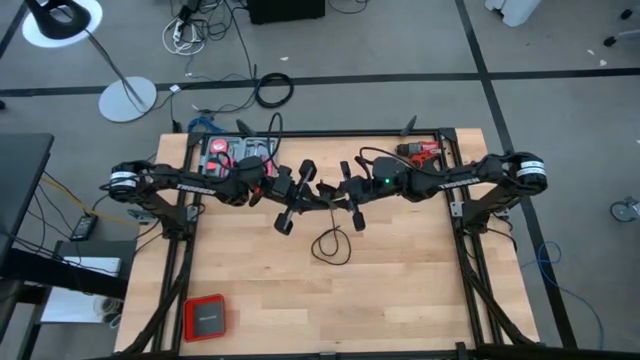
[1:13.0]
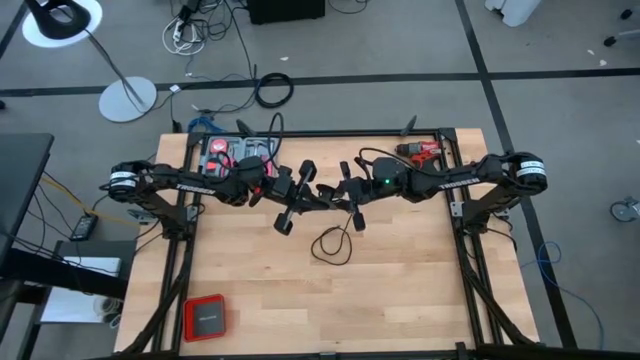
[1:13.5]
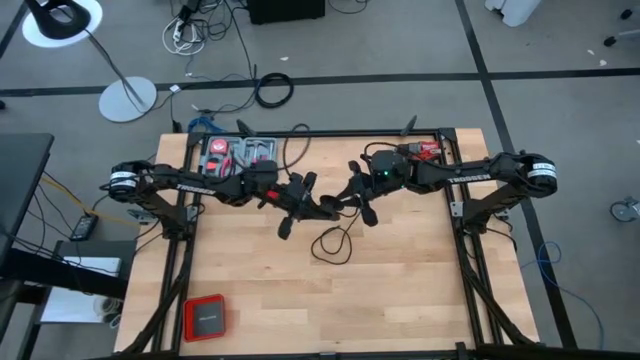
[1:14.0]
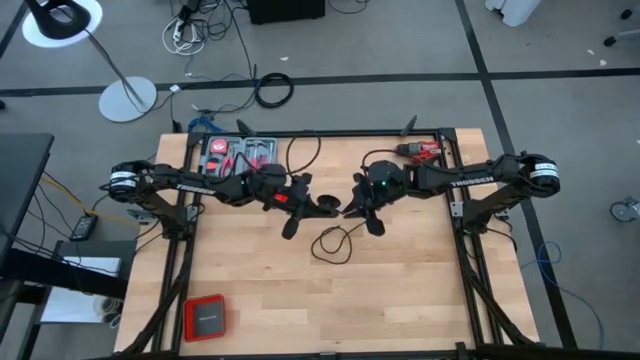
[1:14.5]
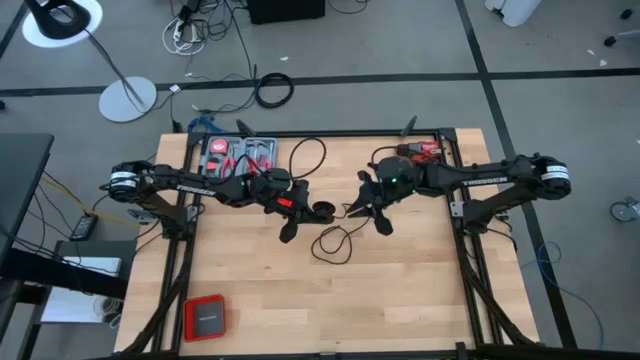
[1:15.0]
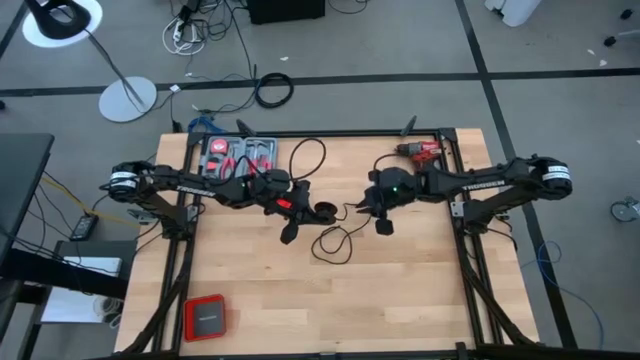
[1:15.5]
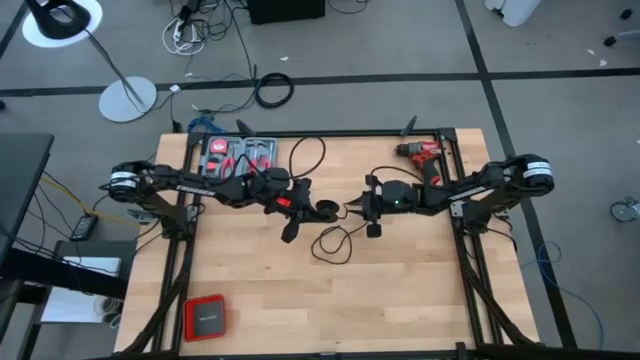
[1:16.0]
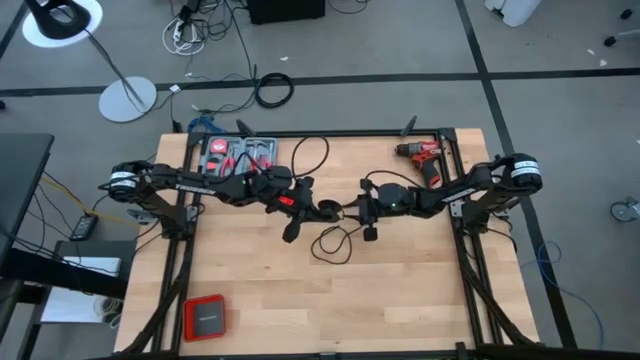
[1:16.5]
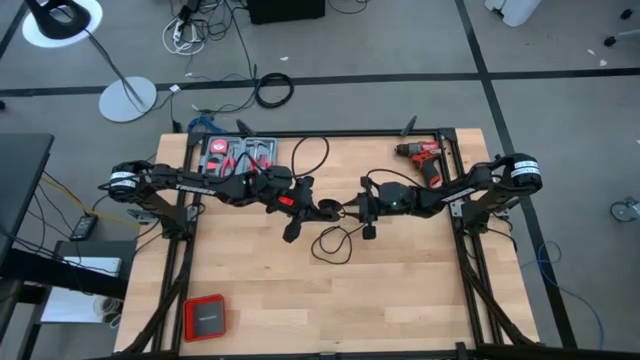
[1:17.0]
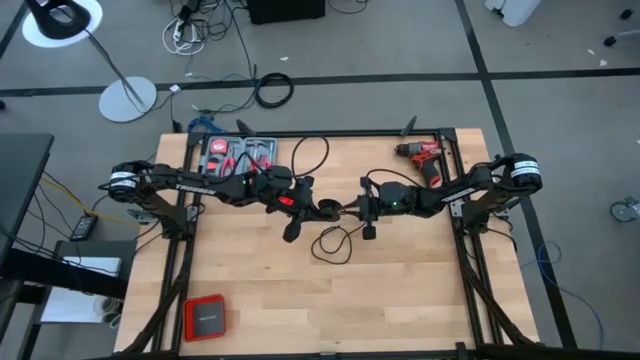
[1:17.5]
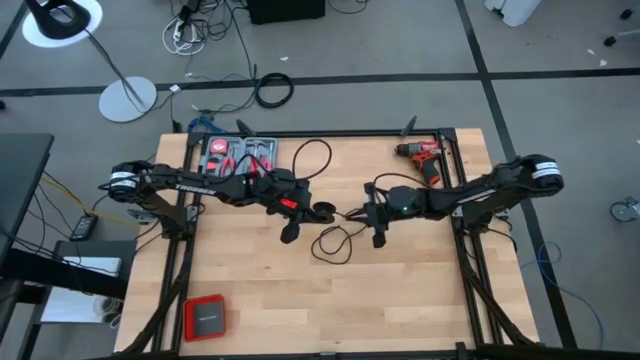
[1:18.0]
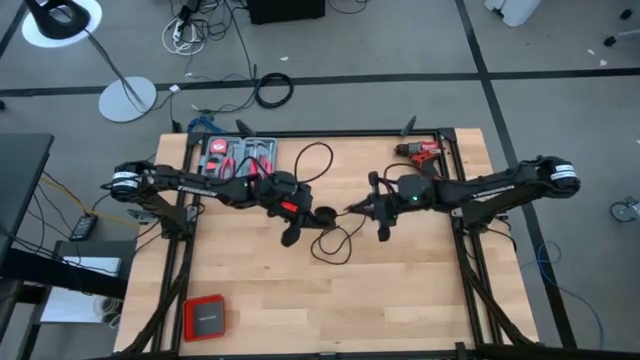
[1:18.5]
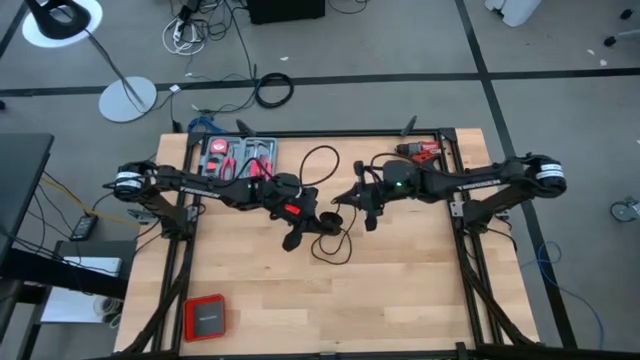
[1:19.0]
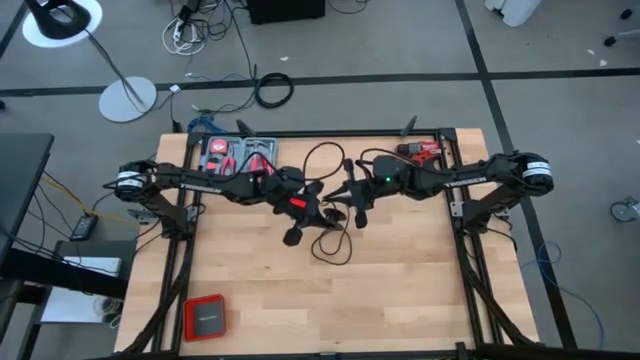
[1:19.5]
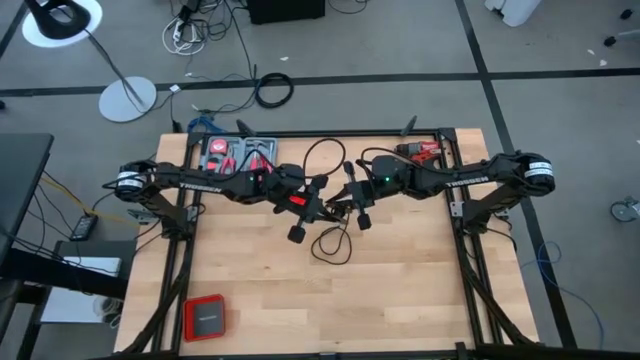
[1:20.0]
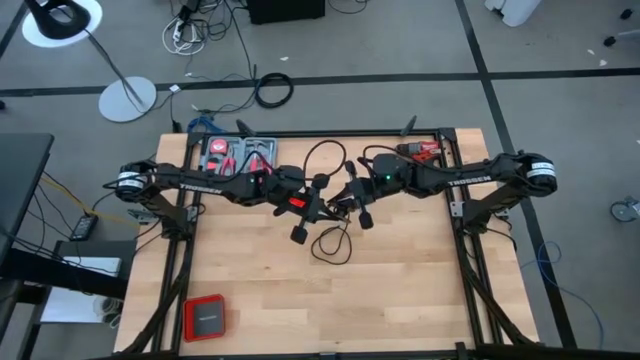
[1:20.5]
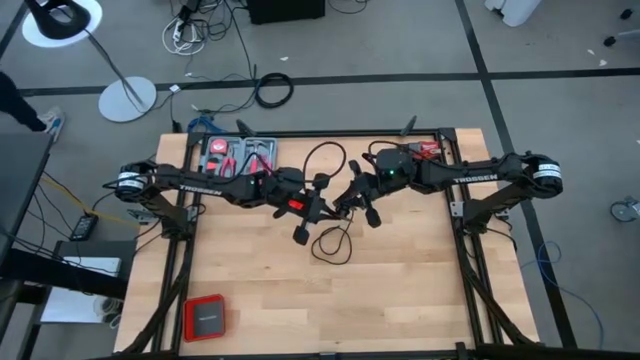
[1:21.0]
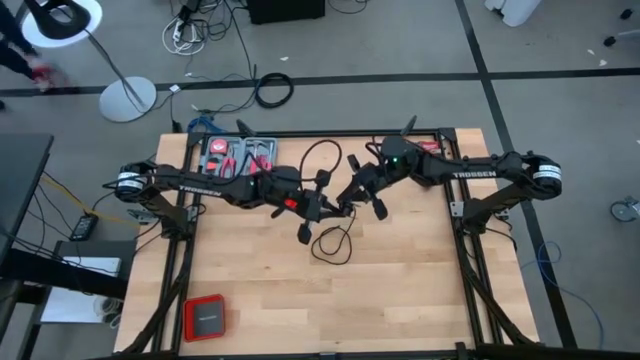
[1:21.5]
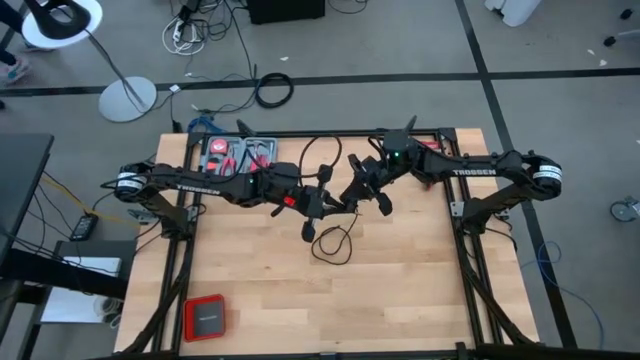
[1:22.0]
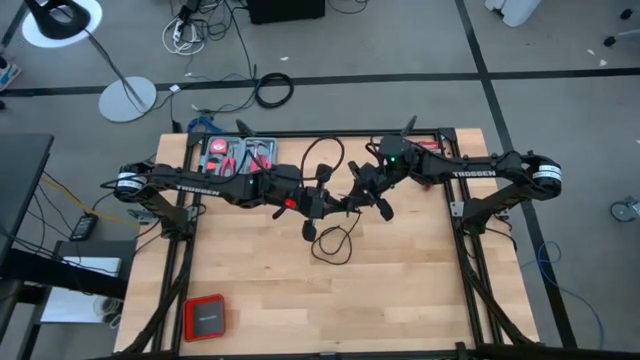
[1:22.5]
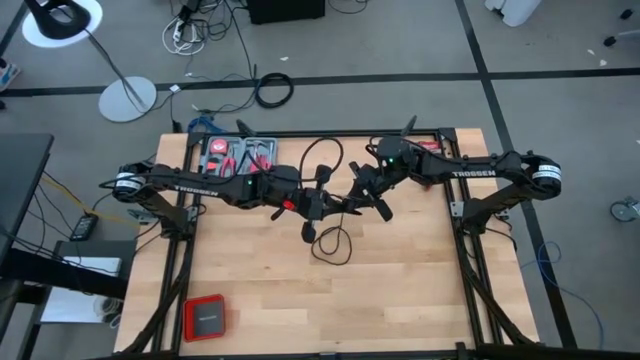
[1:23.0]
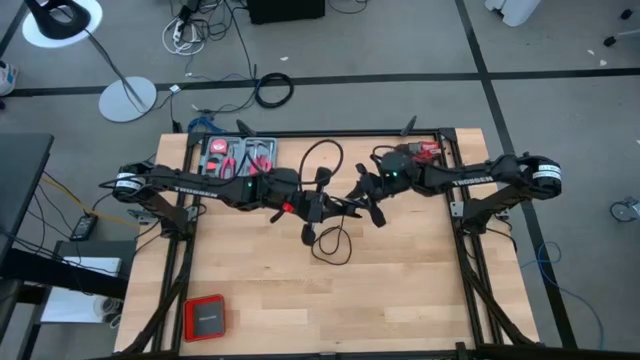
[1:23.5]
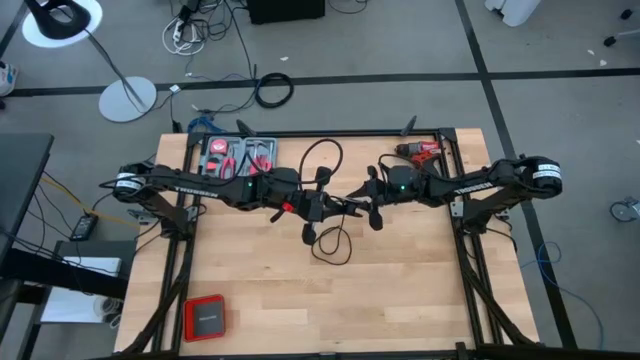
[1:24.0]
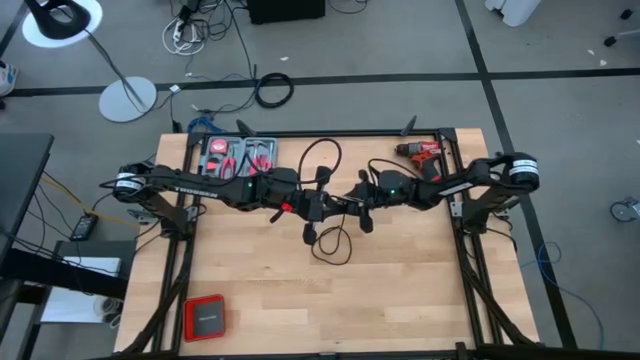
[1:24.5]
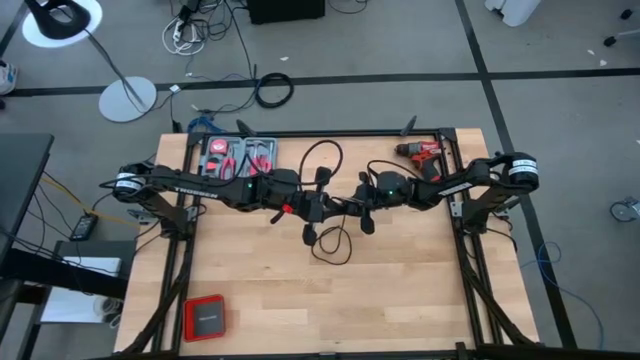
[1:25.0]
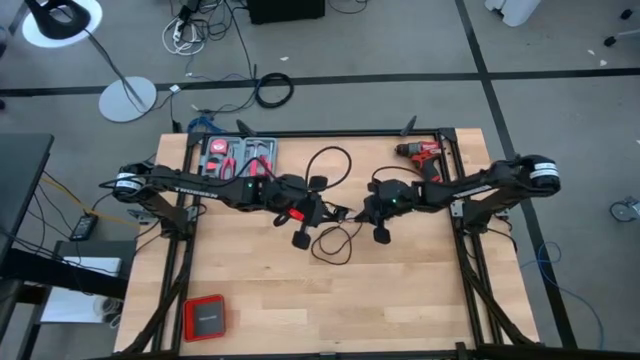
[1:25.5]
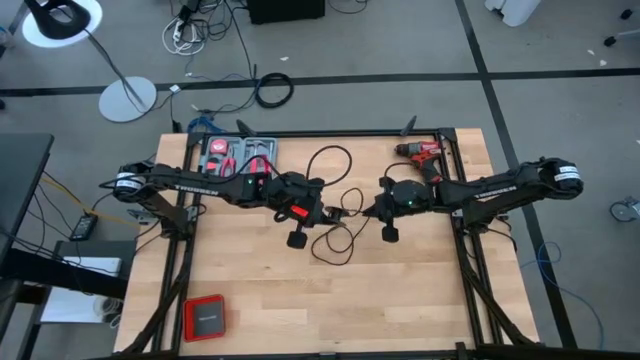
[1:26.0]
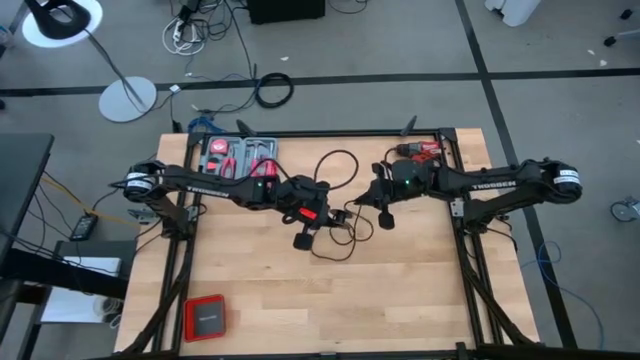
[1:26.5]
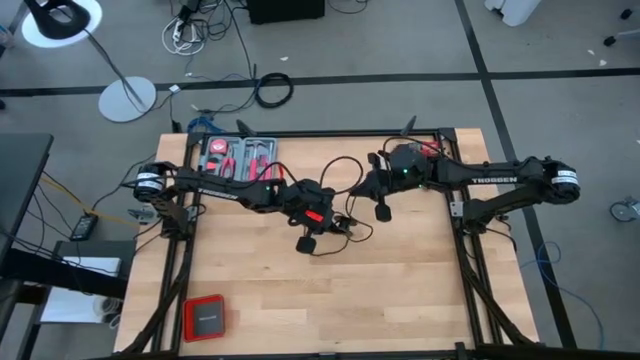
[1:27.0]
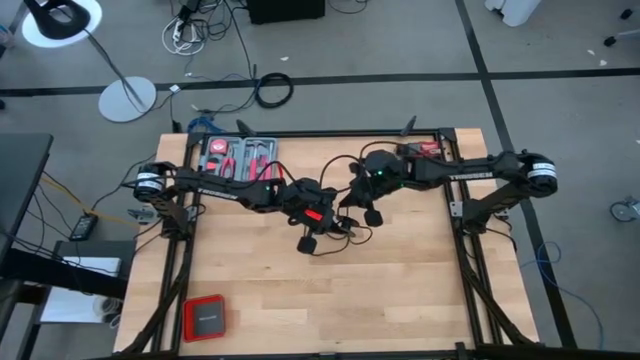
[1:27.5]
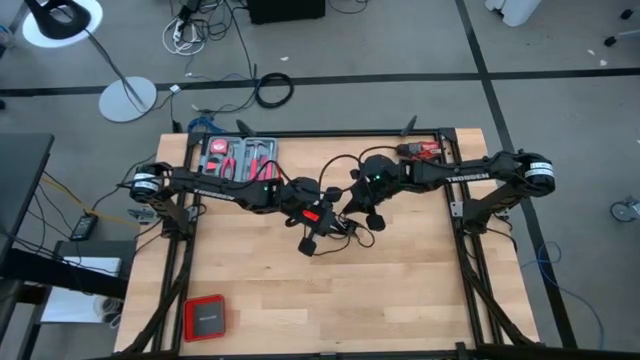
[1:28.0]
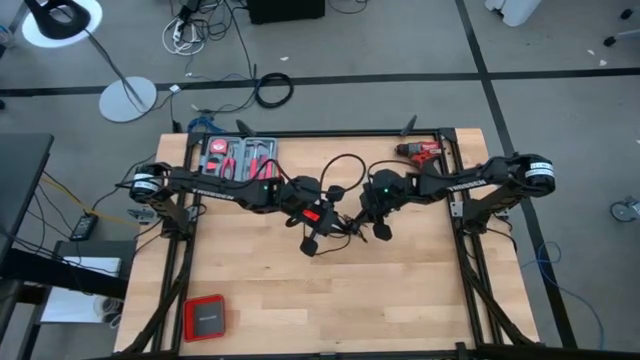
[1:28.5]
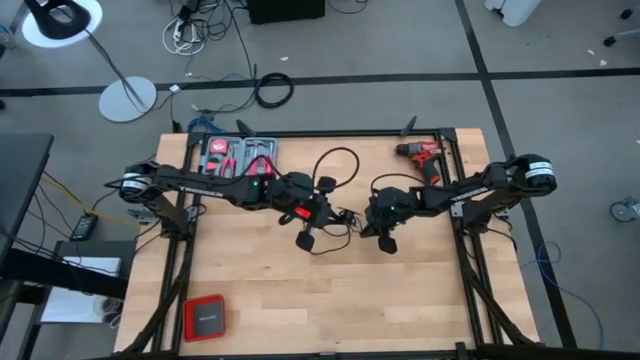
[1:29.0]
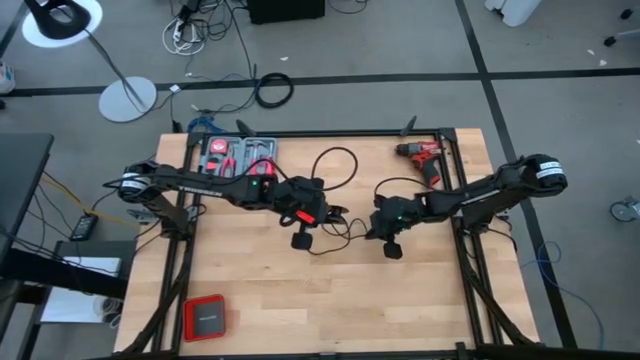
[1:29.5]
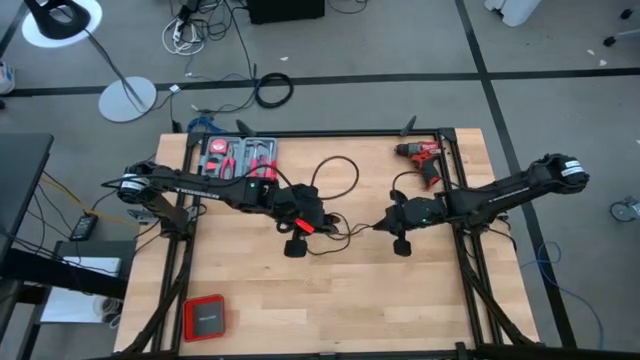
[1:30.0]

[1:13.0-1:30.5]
Task: Coil cords
Coil the black wire on the spool

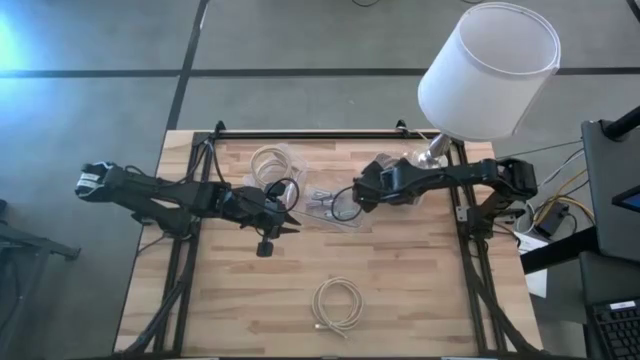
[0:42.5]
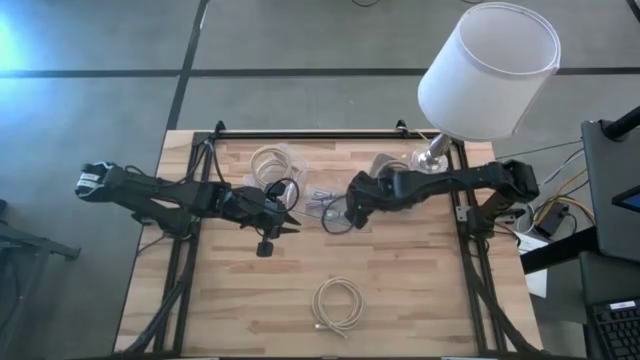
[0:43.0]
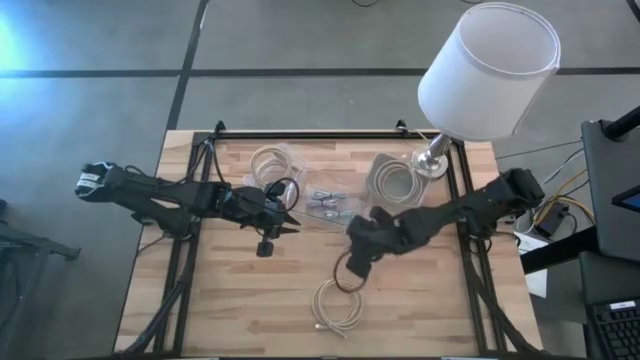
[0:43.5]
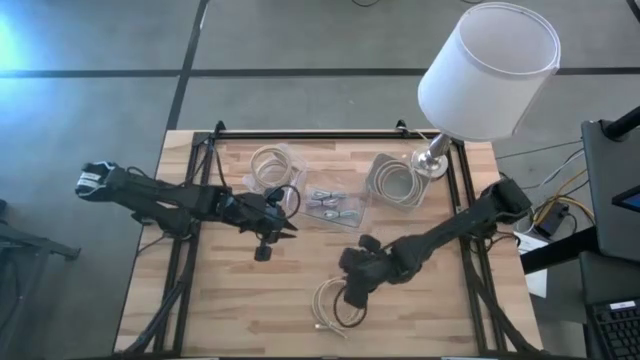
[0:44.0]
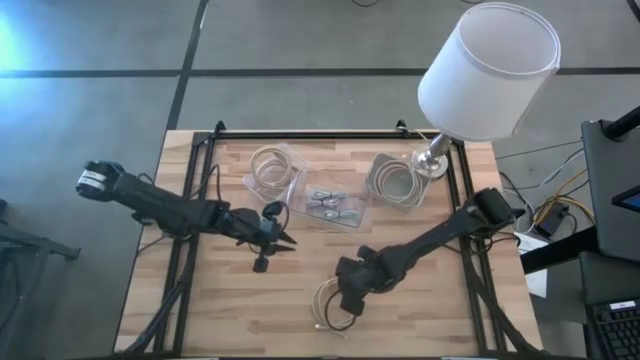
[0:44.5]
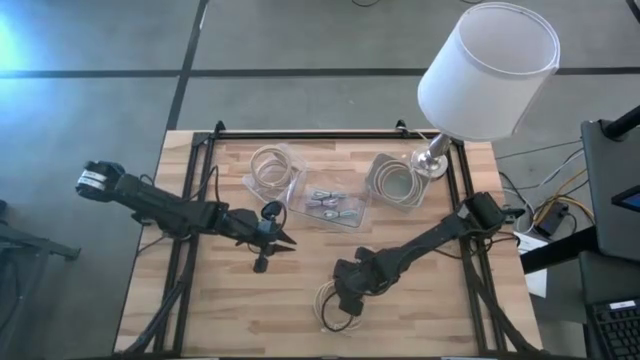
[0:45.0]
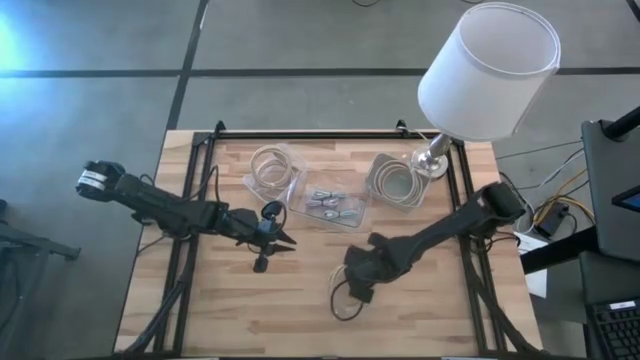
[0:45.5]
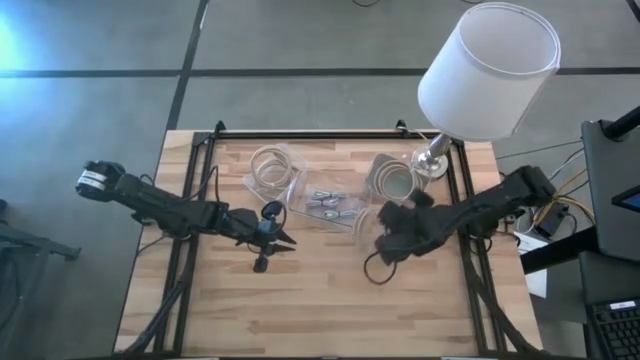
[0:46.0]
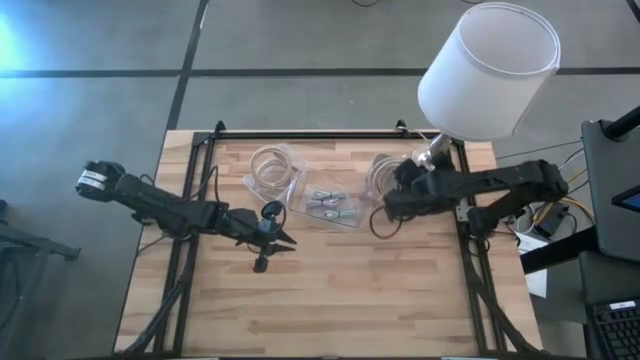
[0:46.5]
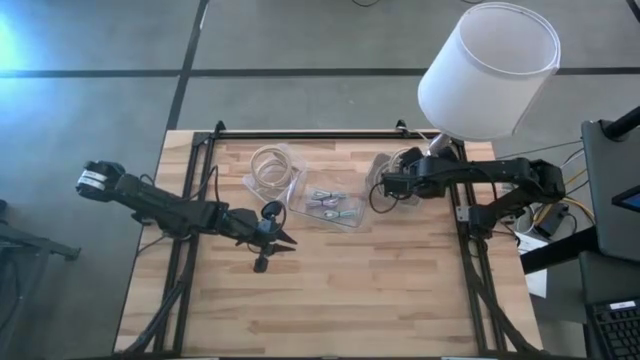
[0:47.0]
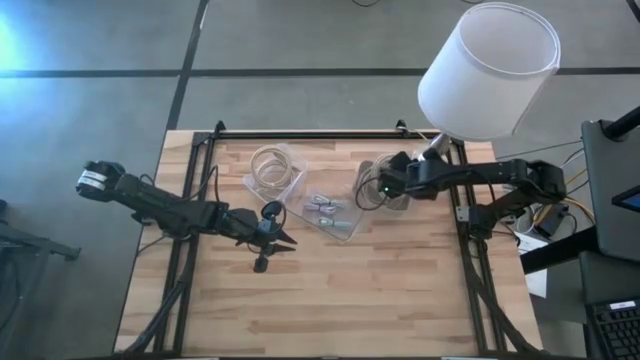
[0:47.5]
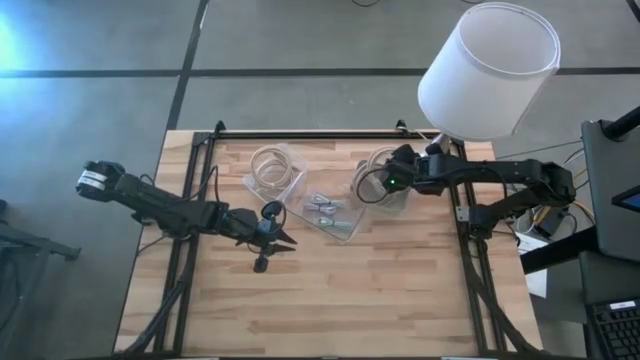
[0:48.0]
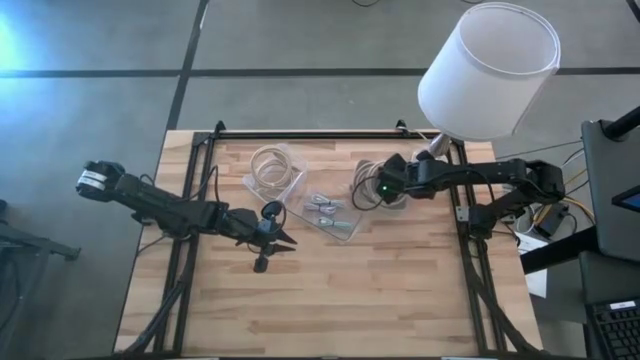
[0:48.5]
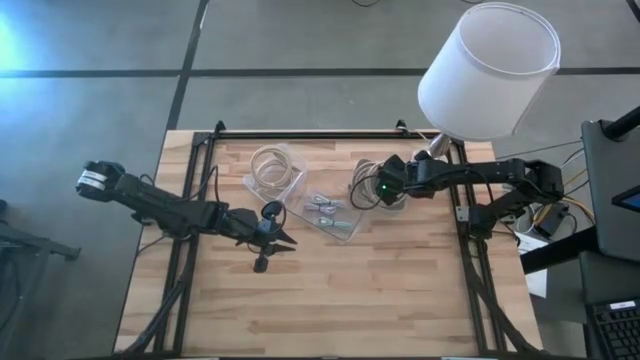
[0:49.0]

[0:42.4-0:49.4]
Task: Pick & Place USB Port
Put the brown USB cable into the gray bin
